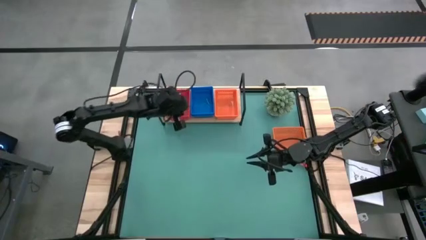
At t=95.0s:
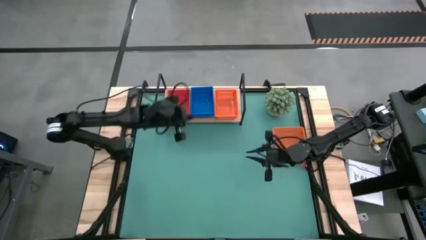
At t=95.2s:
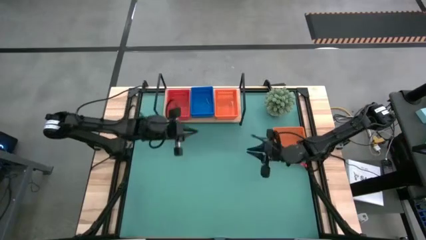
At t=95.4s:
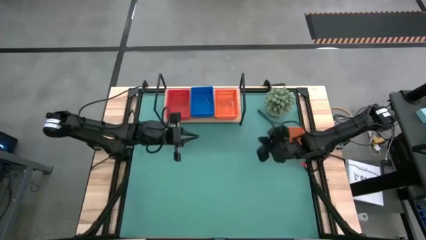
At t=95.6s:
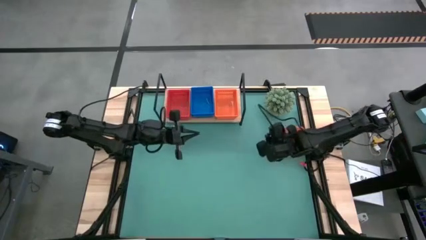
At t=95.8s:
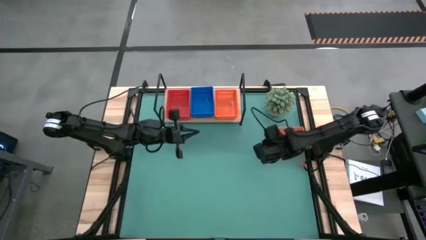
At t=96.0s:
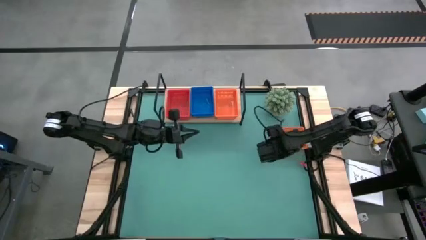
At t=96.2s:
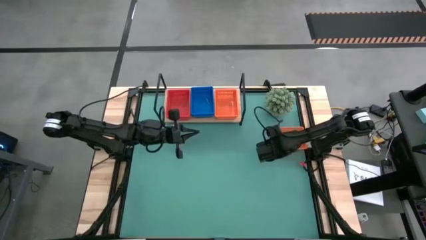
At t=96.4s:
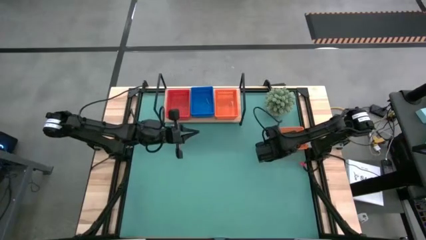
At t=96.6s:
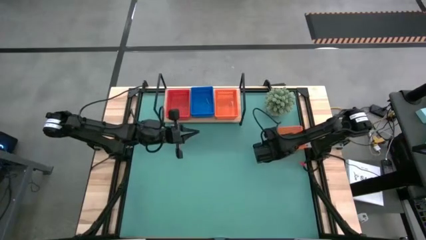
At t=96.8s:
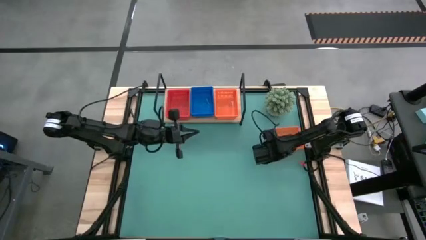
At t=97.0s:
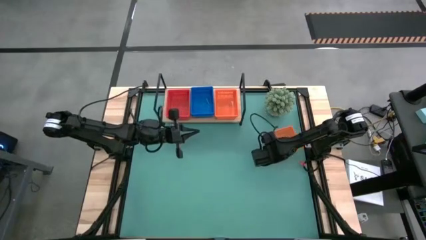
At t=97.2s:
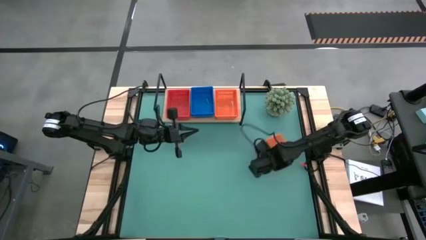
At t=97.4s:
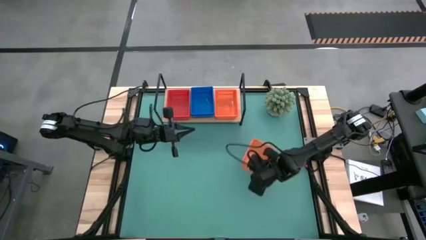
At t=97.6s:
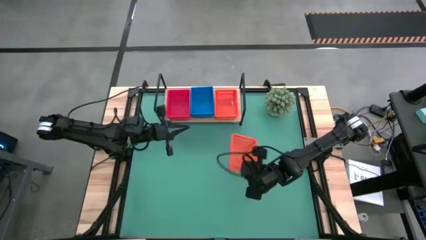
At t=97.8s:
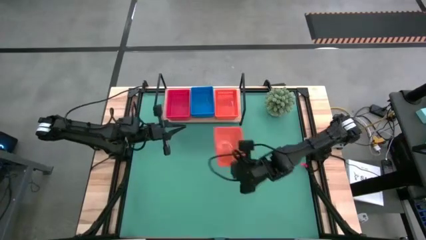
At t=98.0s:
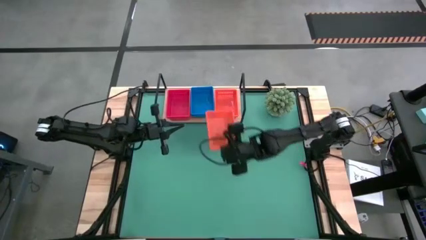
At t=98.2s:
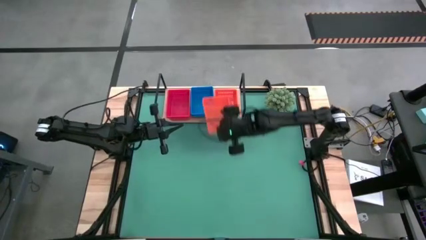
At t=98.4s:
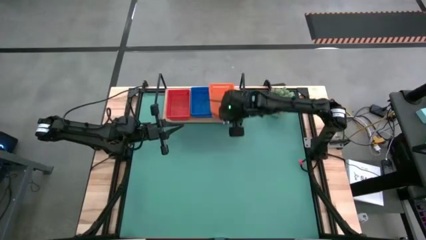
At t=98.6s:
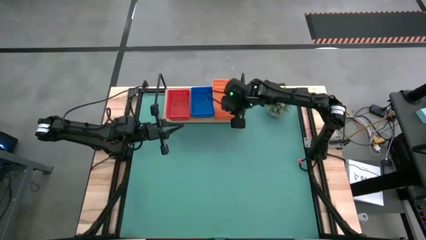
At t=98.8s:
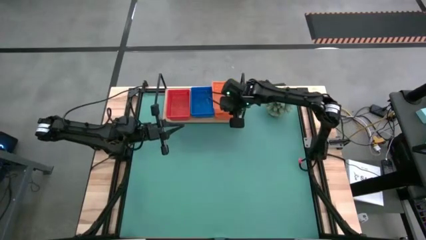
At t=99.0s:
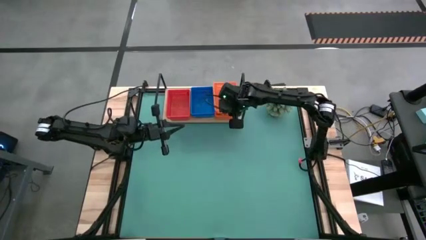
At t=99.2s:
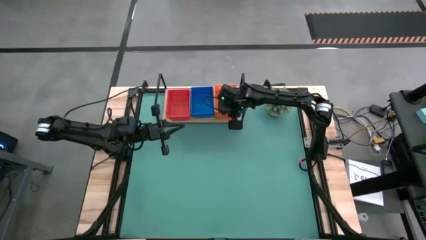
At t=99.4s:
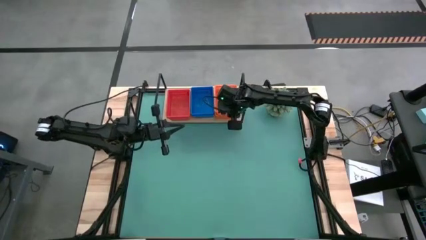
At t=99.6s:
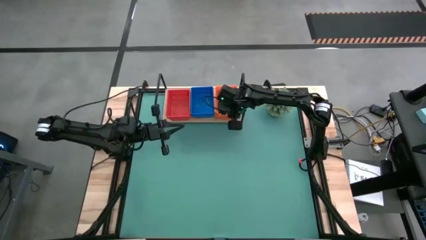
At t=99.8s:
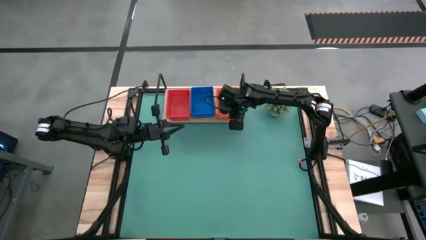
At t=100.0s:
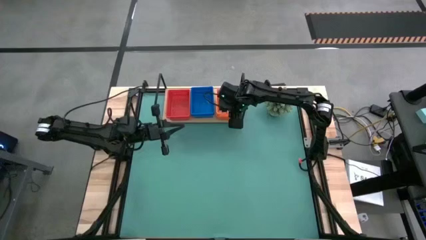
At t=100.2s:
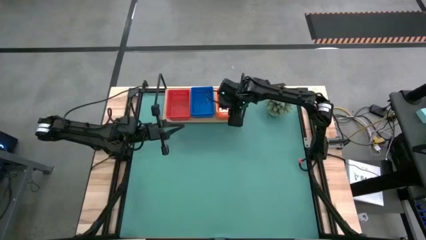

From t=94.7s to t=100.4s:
Task: Stack baskets on shelf by color
Stack the orange bin on top of the orange bin on the shelf

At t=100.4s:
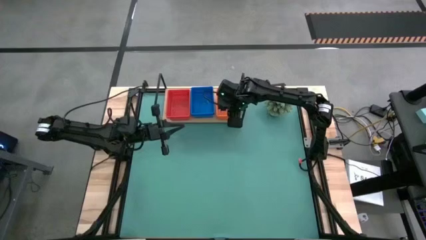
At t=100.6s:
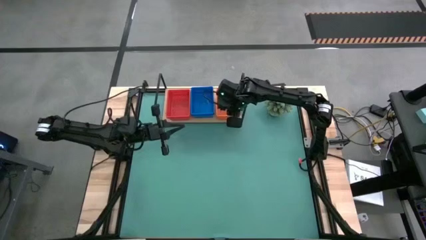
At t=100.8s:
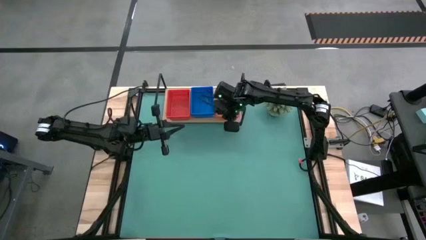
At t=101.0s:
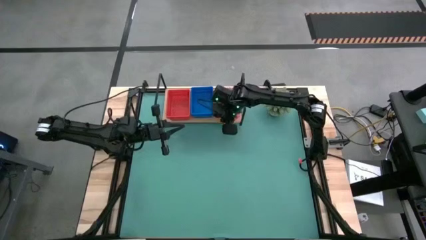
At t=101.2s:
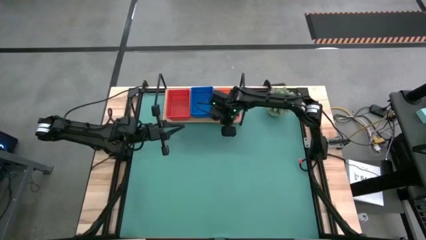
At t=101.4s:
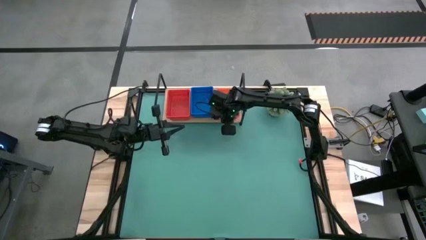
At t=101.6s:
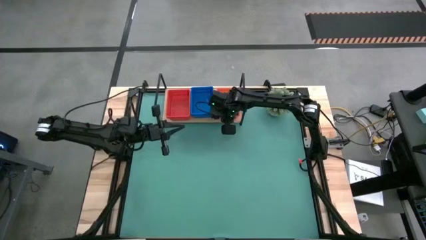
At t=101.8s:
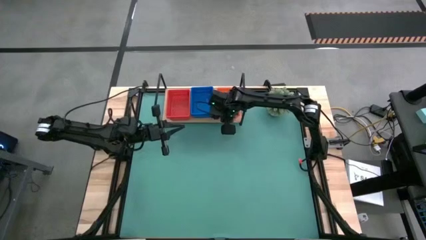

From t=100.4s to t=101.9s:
Adjust the orange bins on the shelf

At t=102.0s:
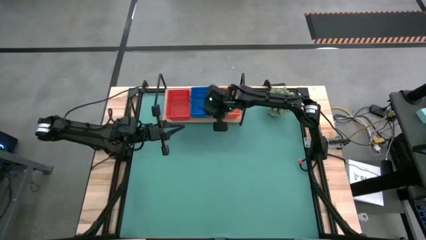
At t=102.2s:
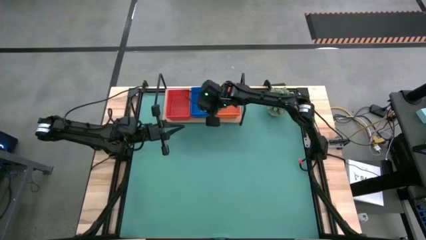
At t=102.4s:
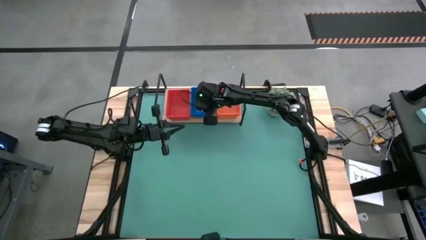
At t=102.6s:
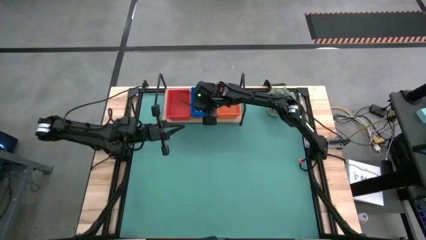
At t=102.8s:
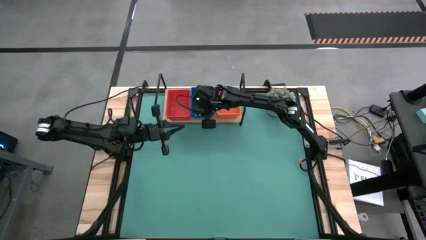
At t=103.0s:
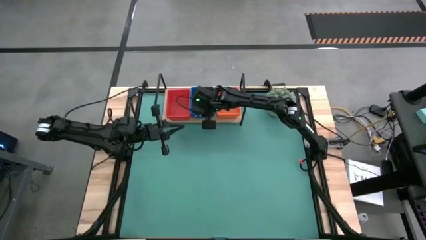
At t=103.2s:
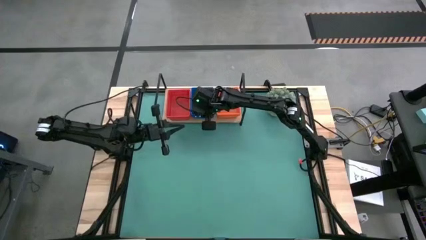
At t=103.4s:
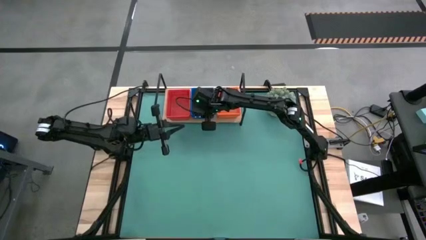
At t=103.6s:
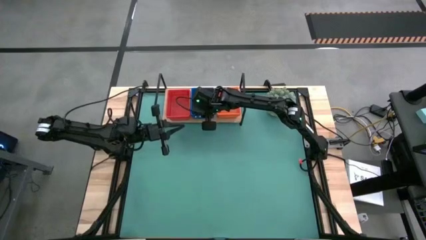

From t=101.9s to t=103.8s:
Adjust the blue bins on the shelf

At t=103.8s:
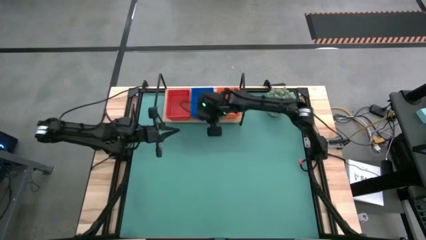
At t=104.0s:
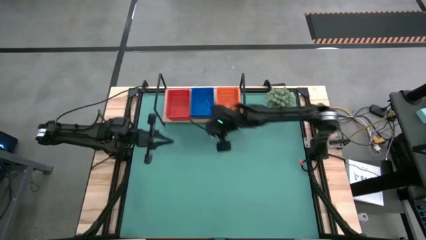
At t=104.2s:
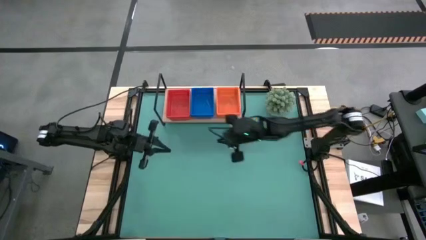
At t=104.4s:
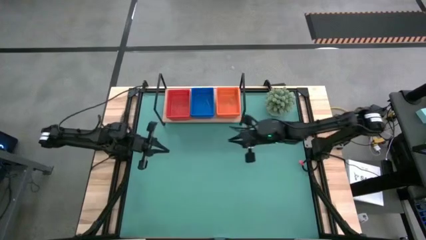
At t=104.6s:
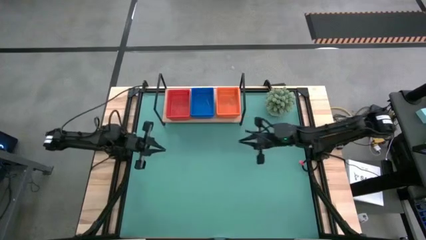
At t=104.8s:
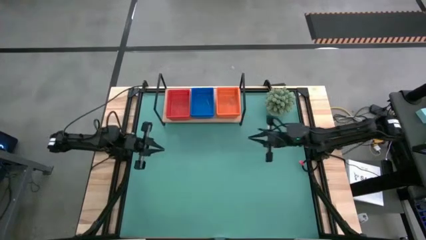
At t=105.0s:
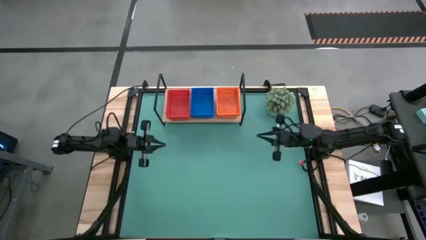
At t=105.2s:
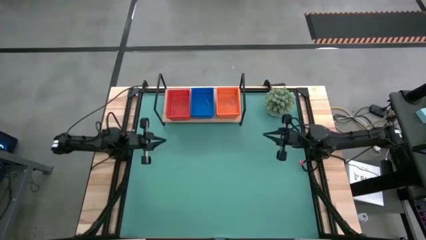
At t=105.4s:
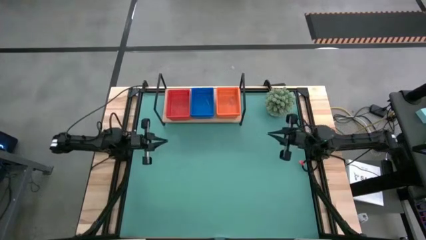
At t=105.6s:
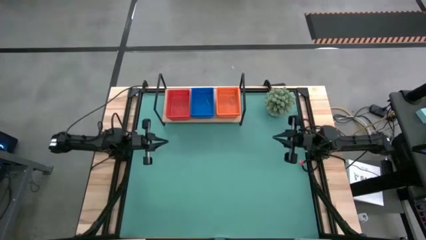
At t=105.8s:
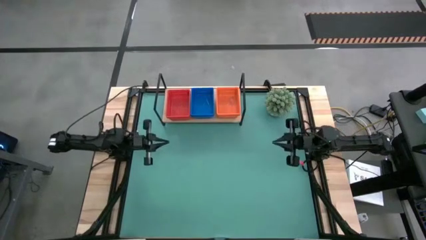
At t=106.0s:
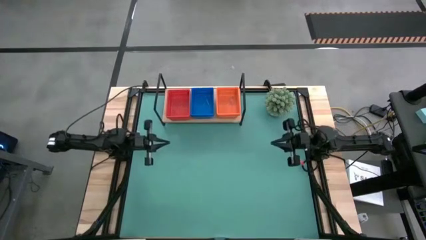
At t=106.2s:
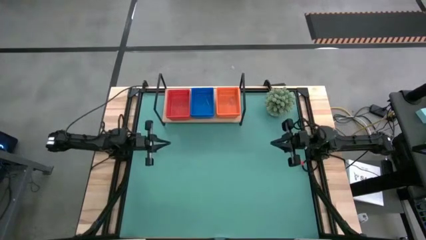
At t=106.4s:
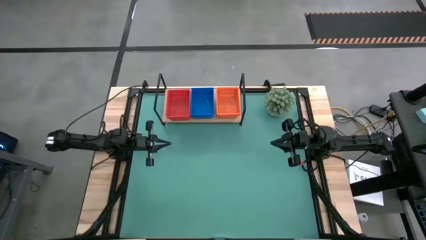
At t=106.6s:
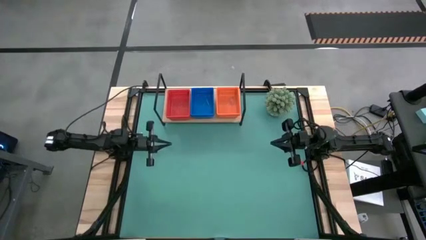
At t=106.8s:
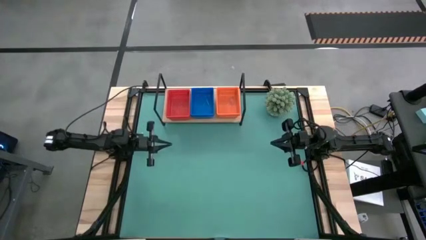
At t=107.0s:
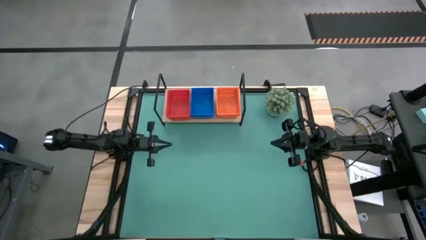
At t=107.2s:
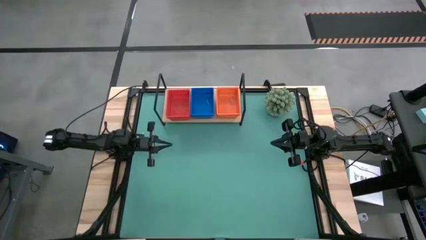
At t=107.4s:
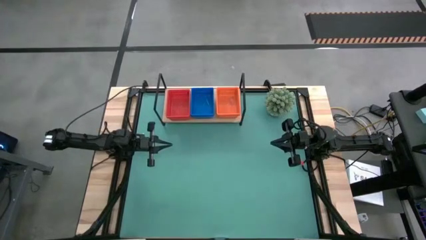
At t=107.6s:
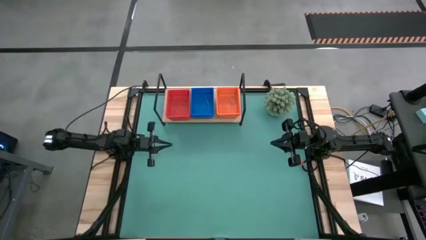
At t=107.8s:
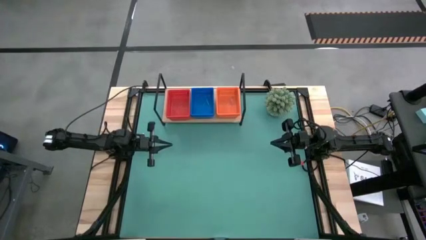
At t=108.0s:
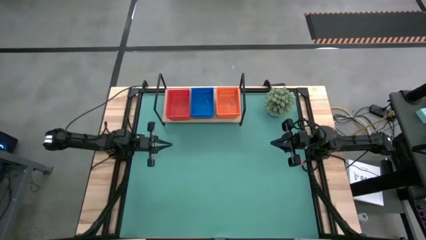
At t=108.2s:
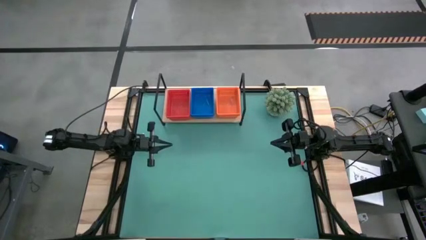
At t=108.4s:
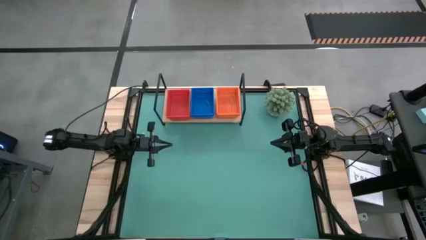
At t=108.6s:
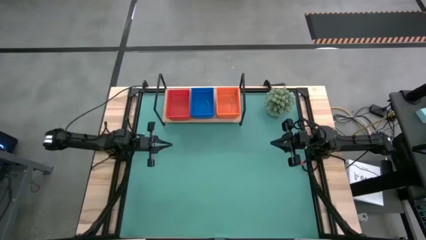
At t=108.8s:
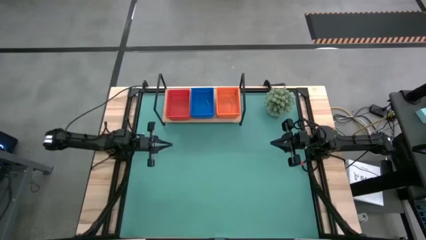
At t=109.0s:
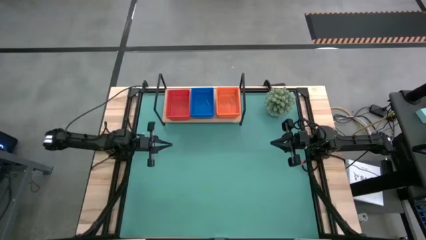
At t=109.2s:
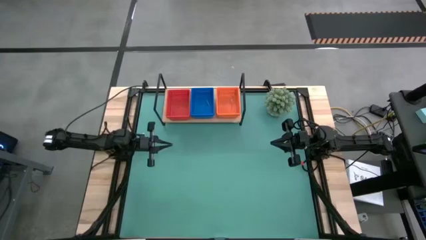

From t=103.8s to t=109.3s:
Return to Home Position

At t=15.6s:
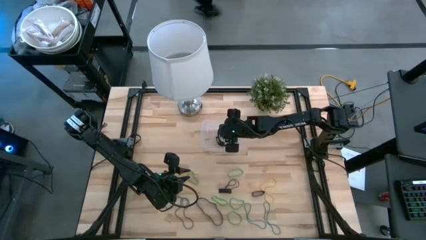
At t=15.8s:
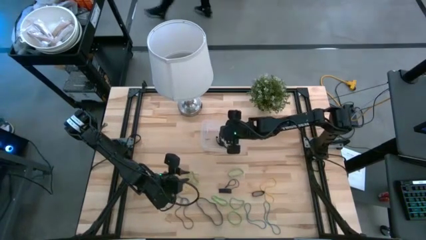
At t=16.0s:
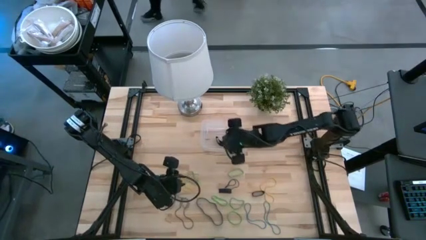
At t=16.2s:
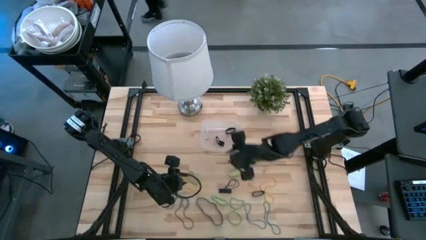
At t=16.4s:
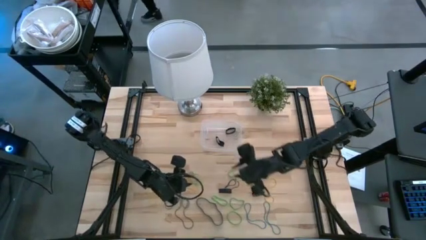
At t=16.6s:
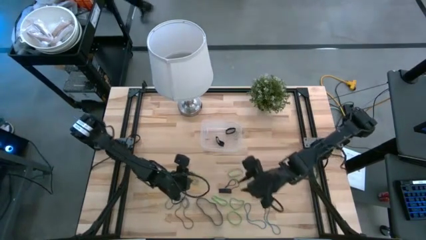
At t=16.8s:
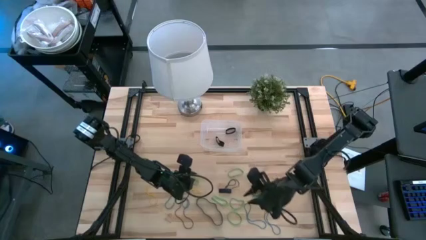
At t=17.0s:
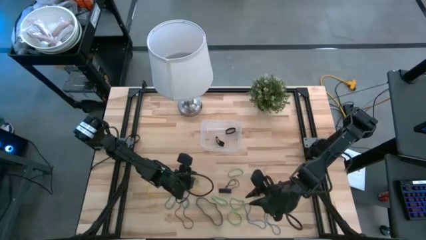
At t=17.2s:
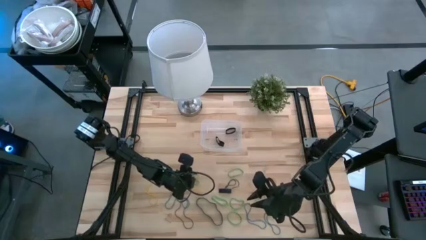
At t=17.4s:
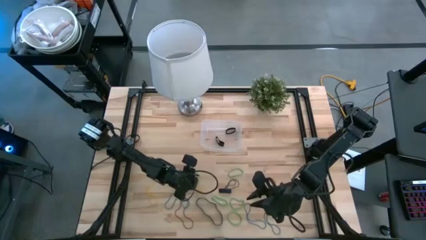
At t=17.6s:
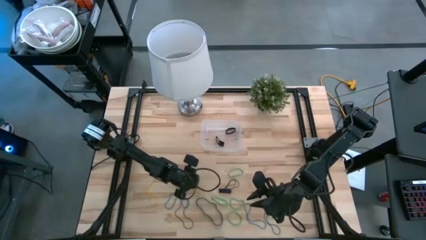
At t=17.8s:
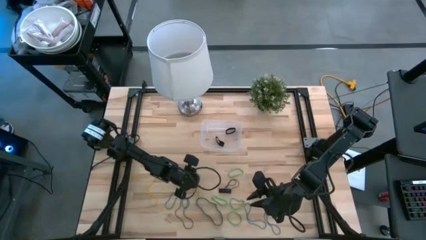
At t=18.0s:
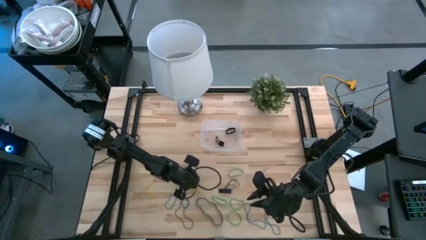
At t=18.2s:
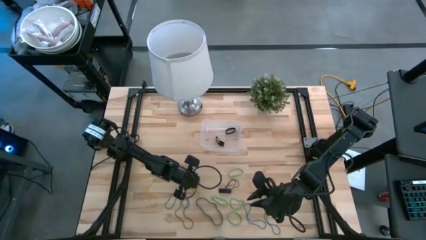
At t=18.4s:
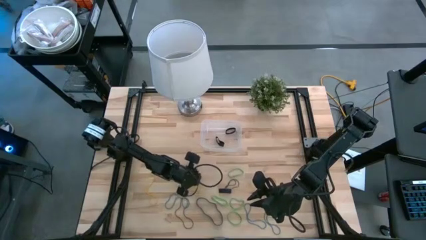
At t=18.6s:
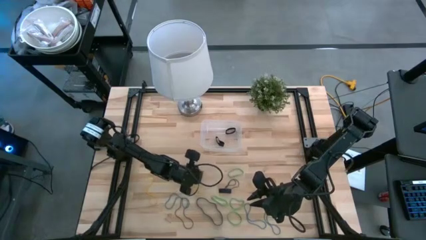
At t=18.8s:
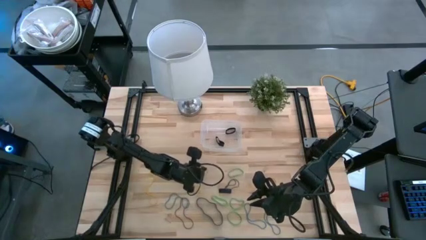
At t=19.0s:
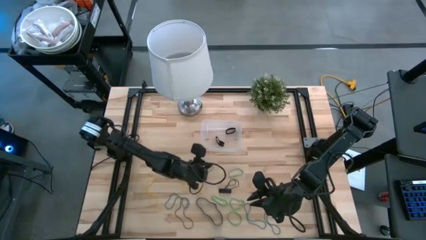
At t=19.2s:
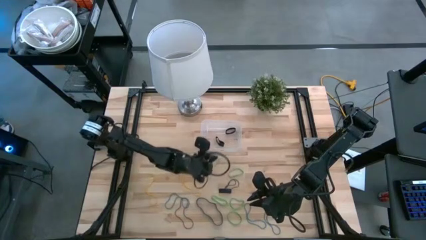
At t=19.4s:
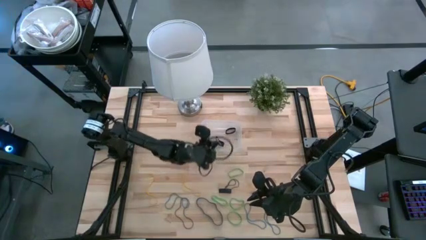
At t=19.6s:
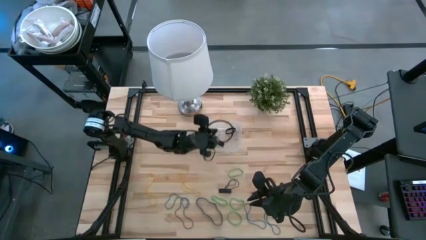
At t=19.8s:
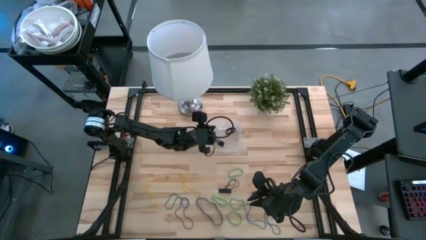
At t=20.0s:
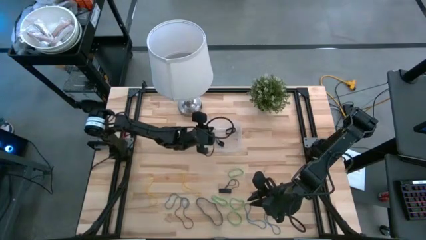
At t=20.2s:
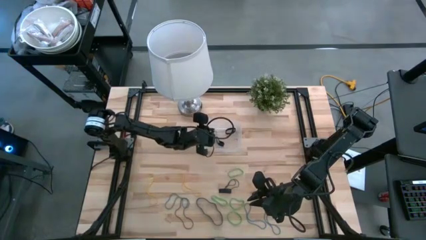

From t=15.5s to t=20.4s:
Task: Pick and place rubber bands into bin
Put the green rubber band into the transparent bin
